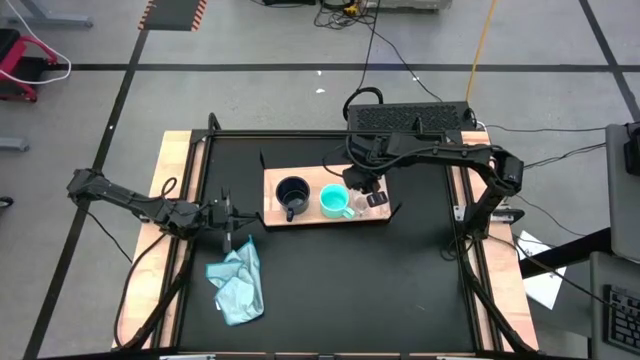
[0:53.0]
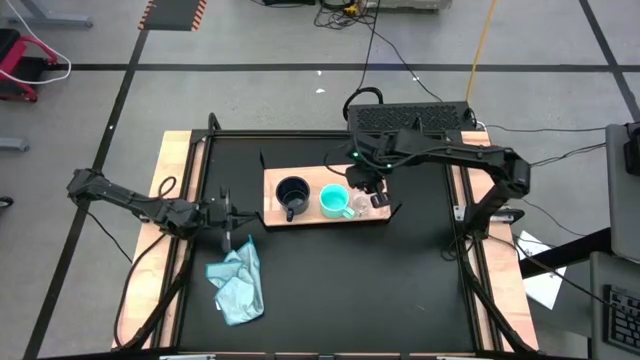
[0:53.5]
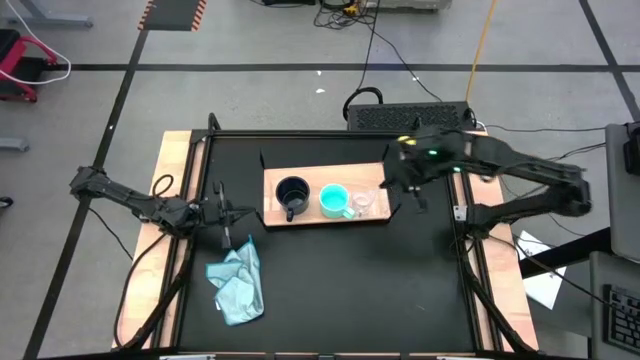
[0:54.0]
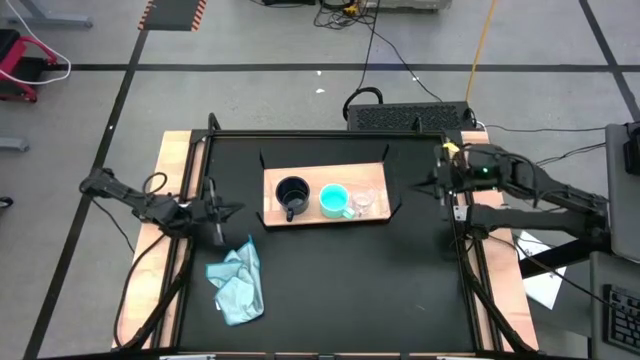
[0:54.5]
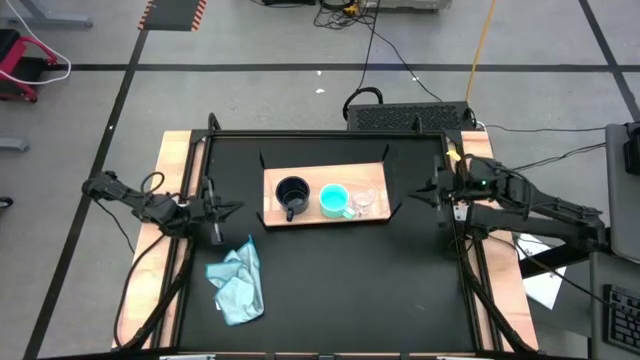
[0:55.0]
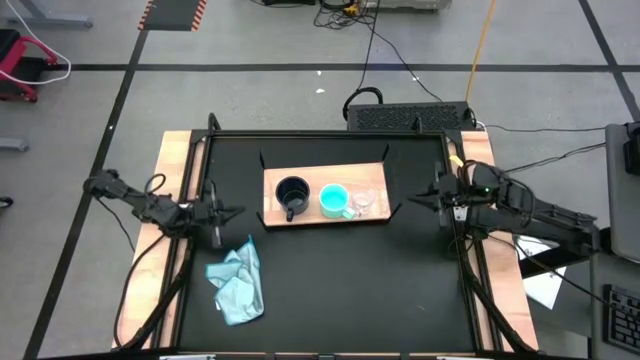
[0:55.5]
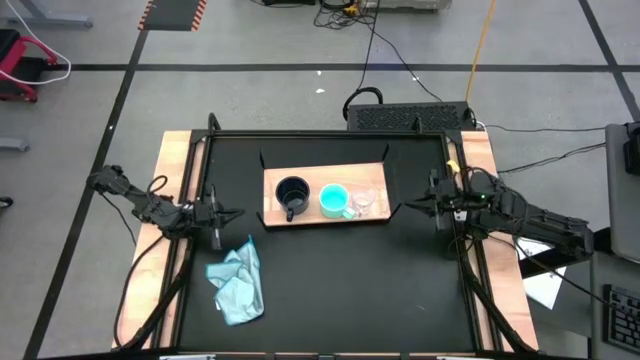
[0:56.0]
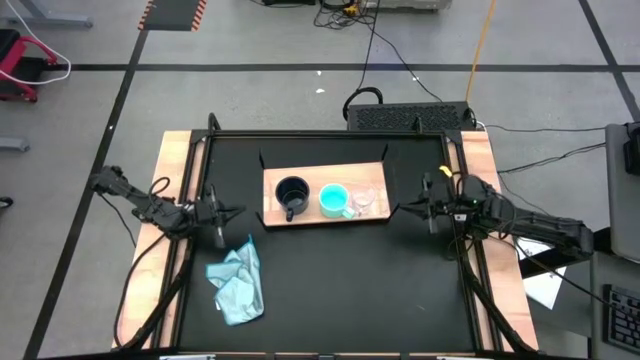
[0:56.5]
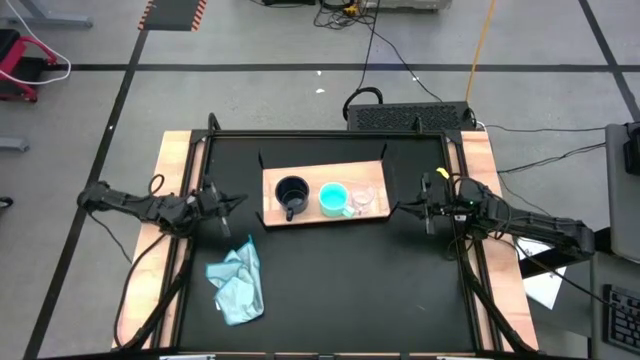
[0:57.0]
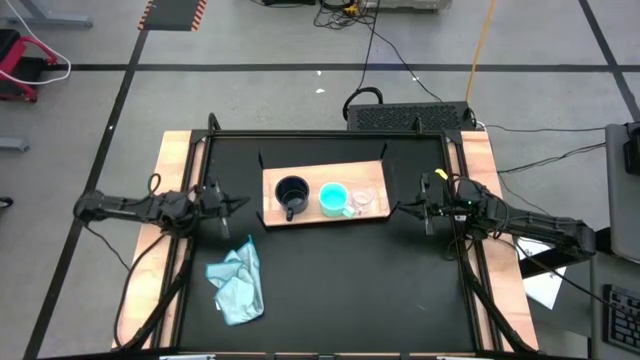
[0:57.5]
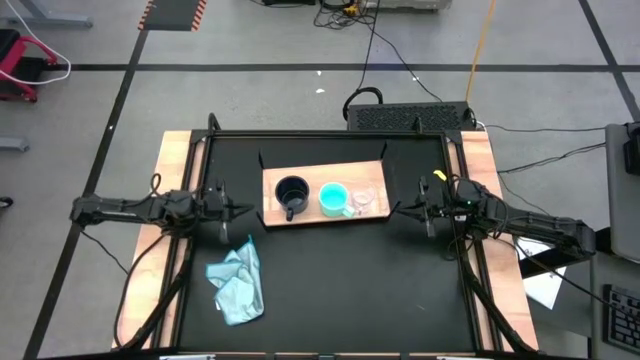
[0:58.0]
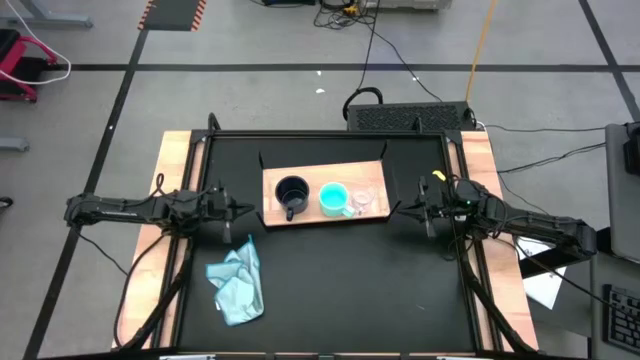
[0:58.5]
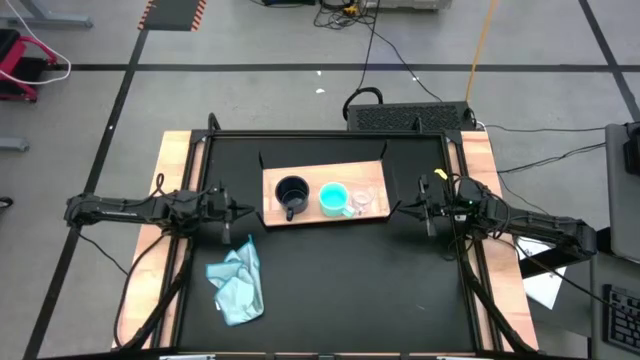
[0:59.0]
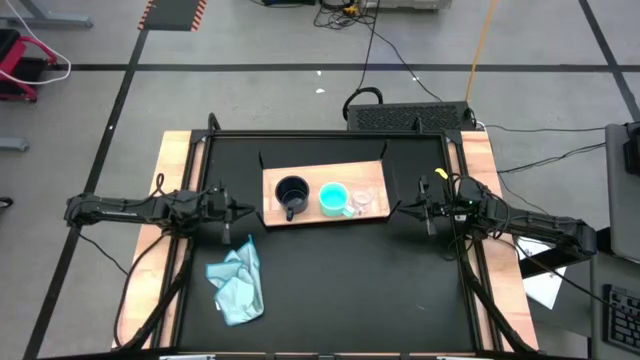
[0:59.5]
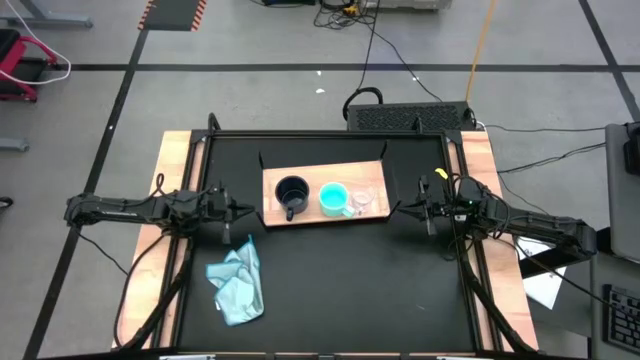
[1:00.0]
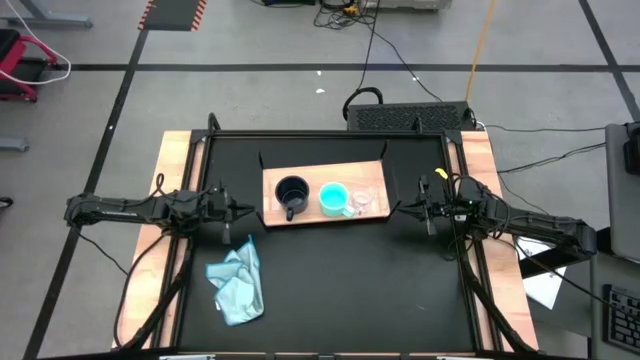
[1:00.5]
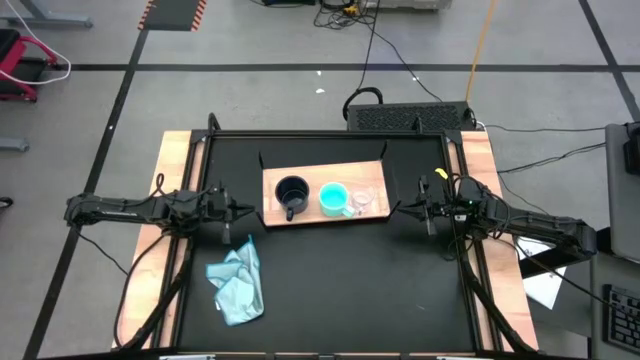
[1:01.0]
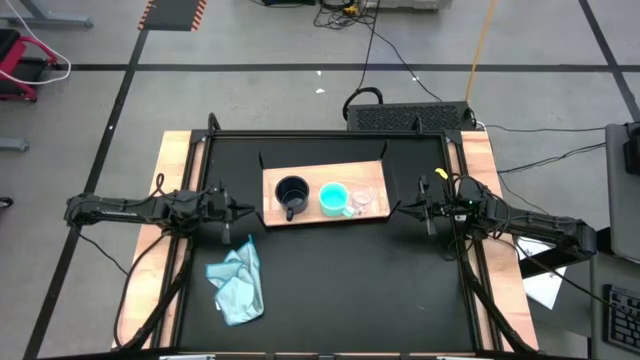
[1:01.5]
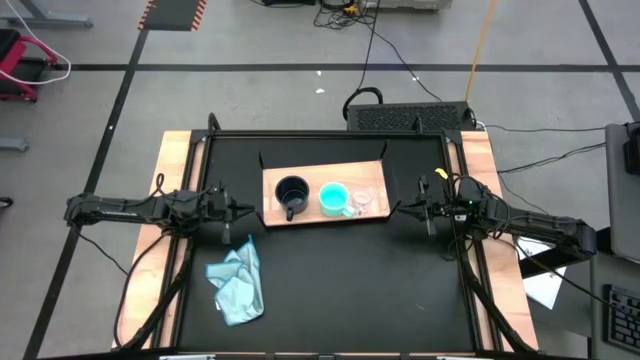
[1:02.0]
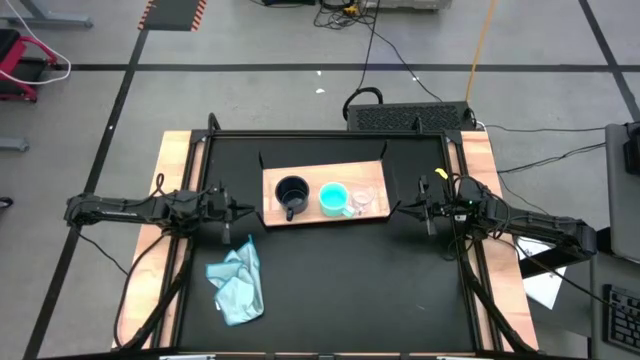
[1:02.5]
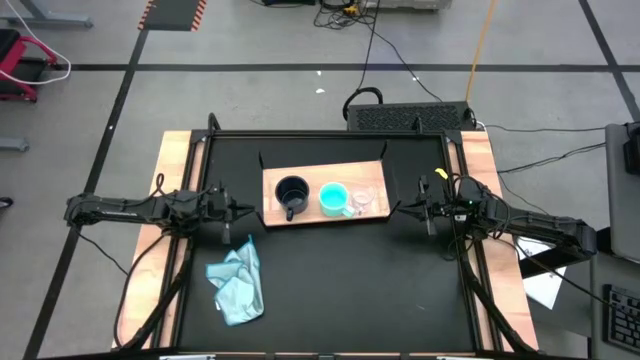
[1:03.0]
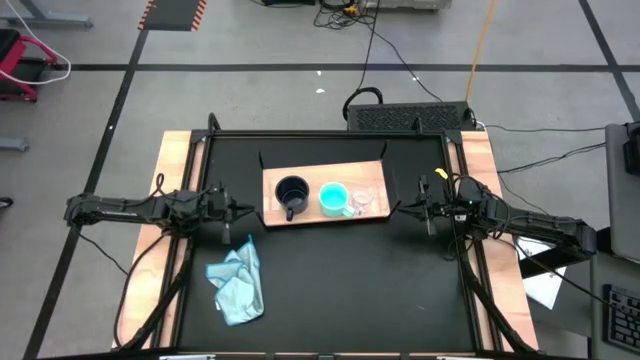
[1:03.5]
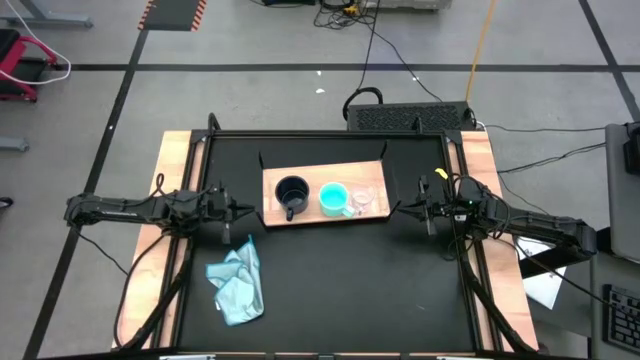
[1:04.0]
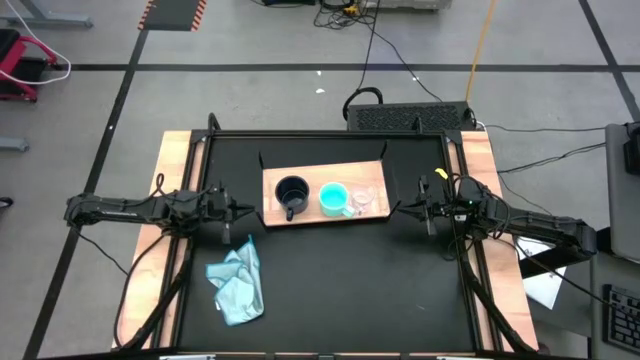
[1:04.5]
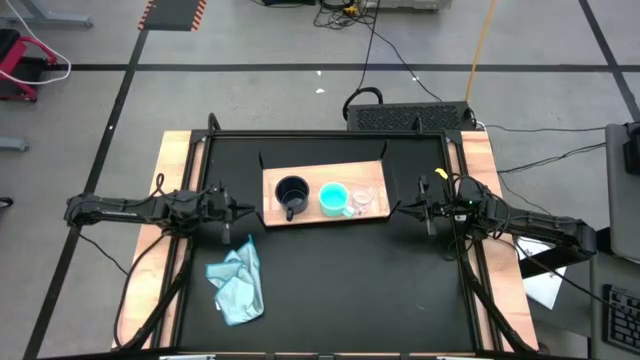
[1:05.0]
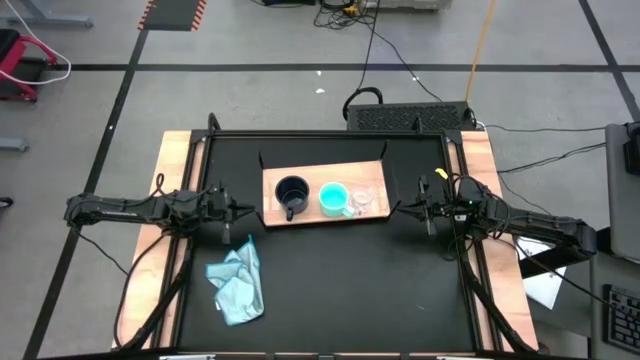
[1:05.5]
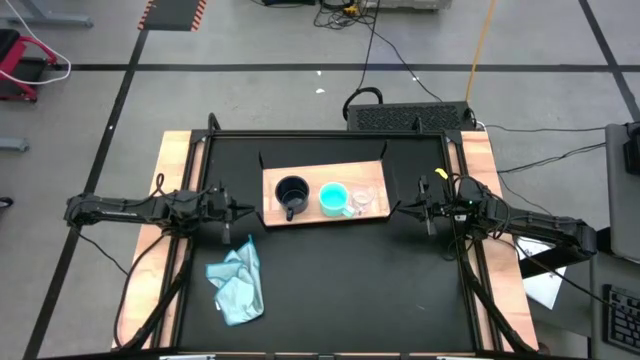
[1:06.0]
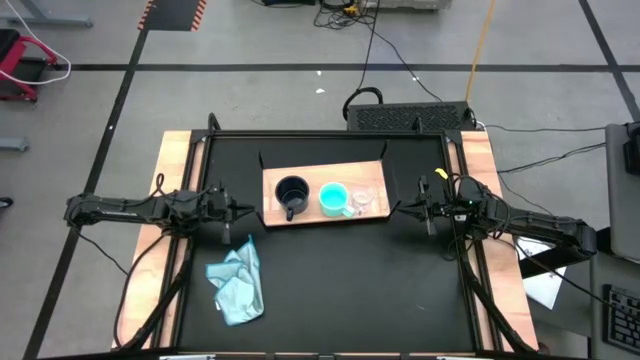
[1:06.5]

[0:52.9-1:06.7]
Task: Stack small to large cups/mugs on shelf
Return to Home Position

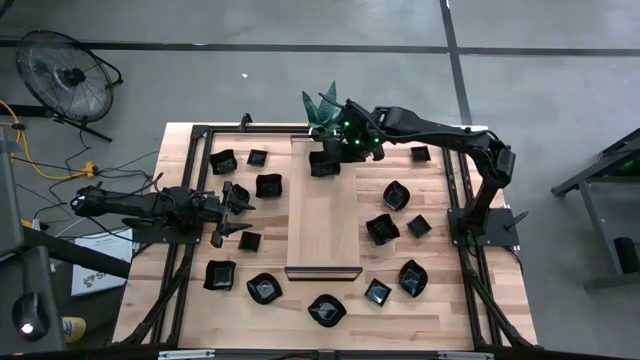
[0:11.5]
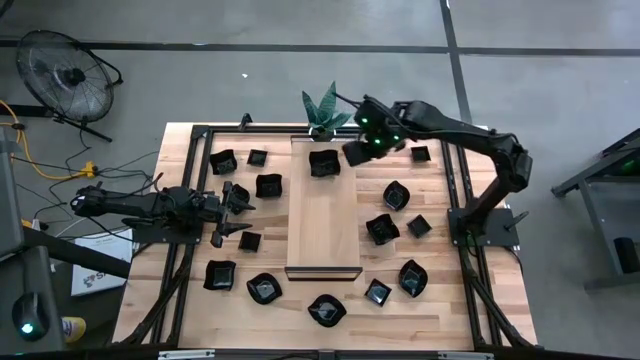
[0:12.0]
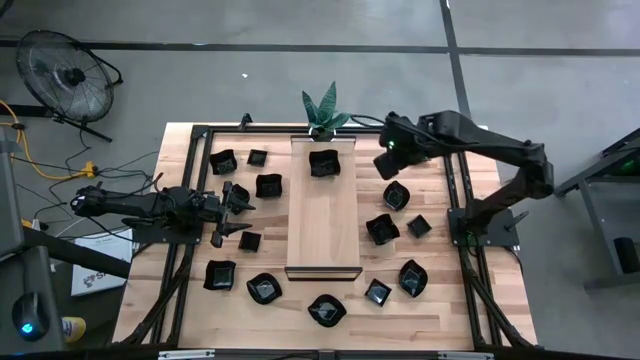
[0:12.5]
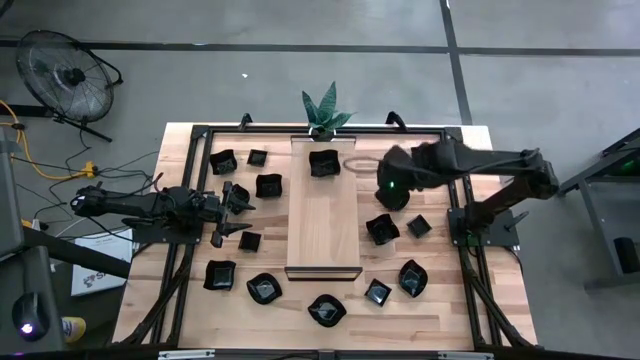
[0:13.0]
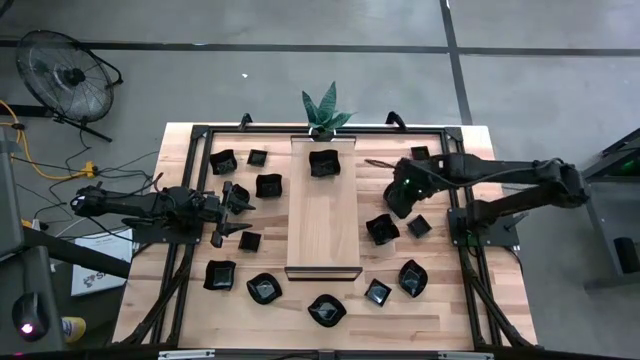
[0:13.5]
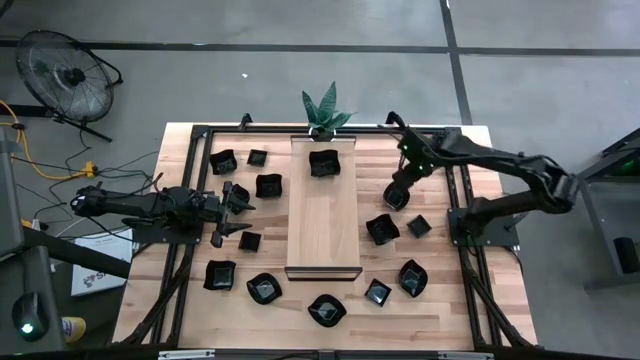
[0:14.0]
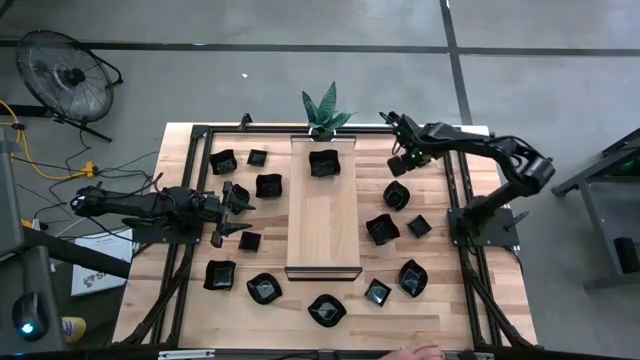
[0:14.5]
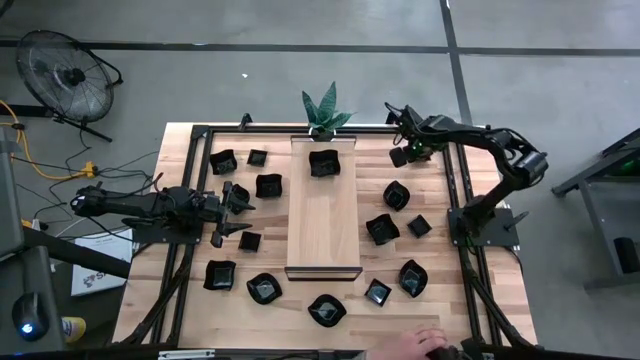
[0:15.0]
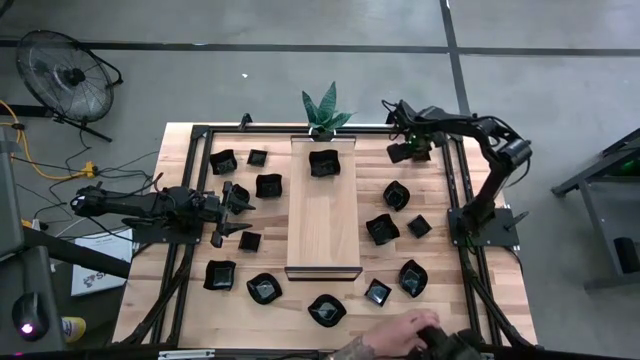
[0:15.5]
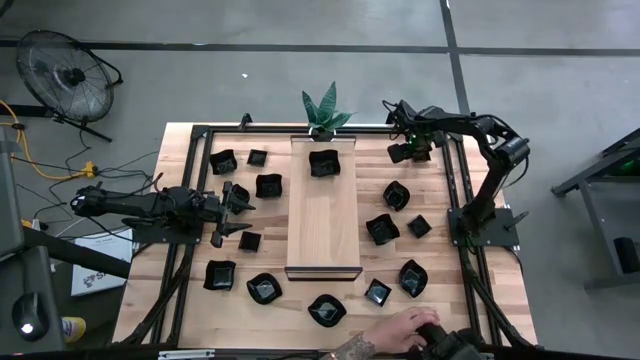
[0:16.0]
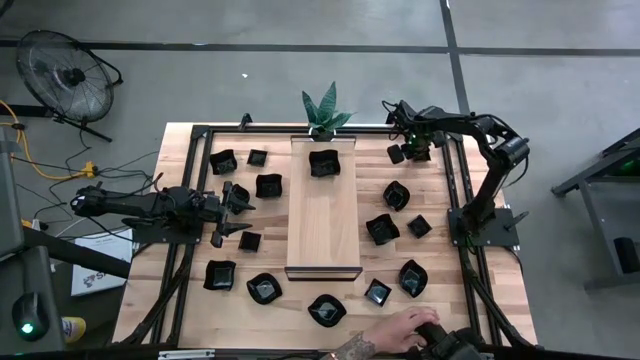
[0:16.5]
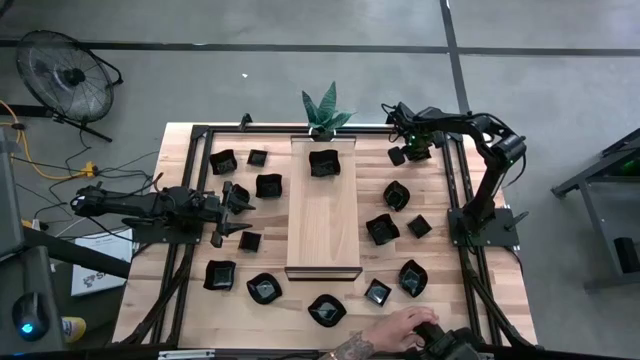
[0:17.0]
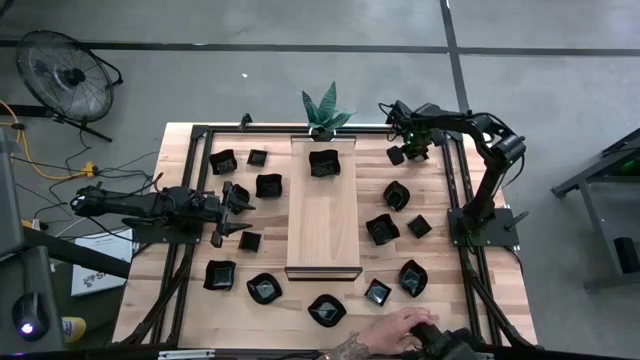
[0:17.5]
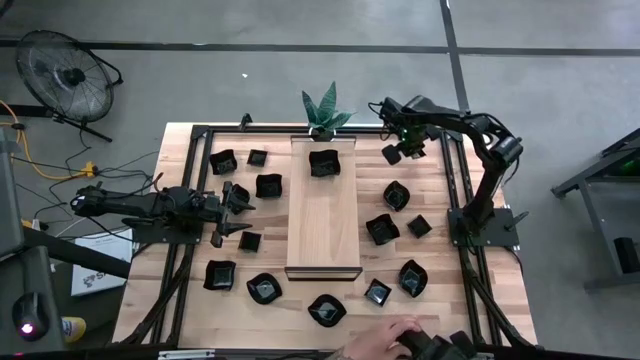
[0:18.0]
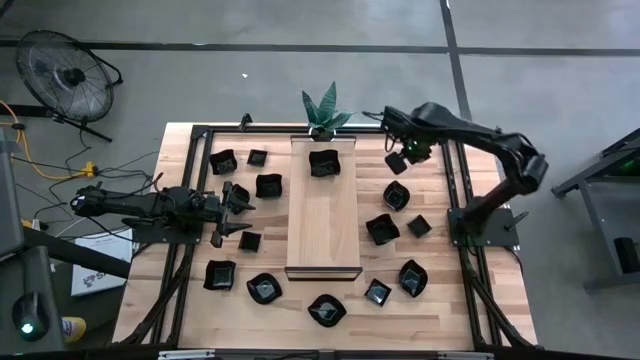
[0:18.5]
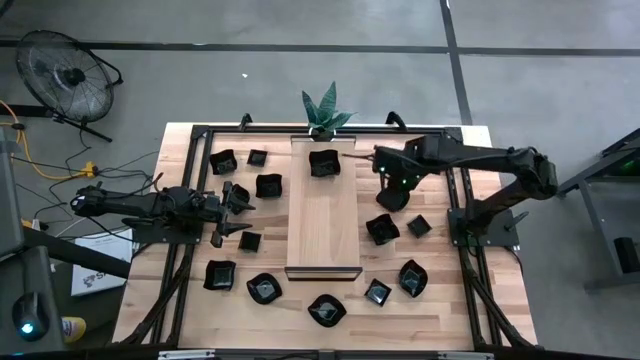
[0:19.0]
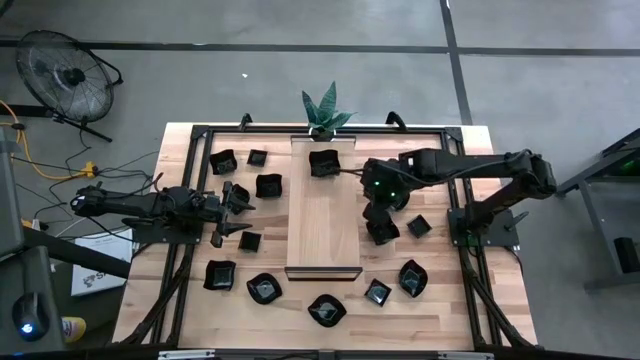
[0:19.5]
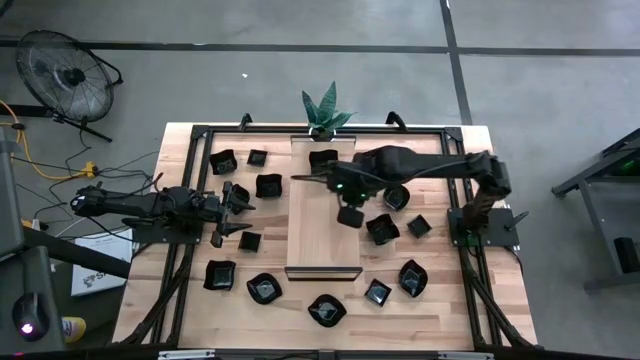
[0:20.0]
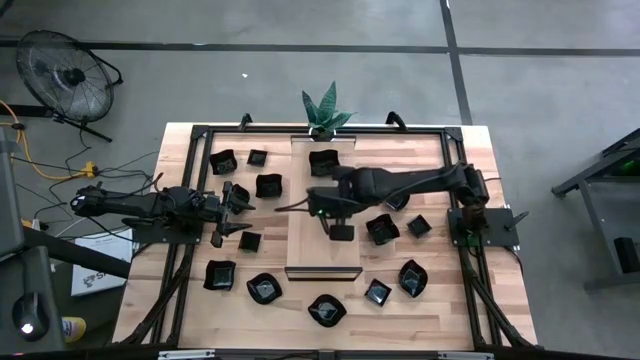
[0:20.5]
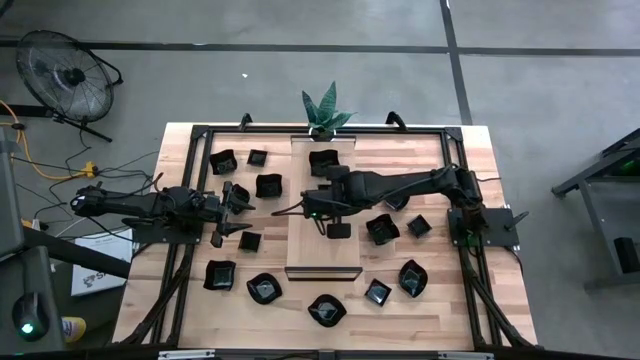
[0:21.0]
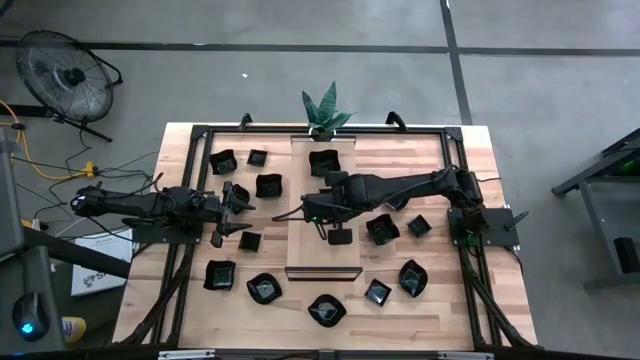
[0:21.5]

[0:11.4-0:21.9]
Task: Pick & Place Mini shaped plates
Put the black square plate on the shelf
